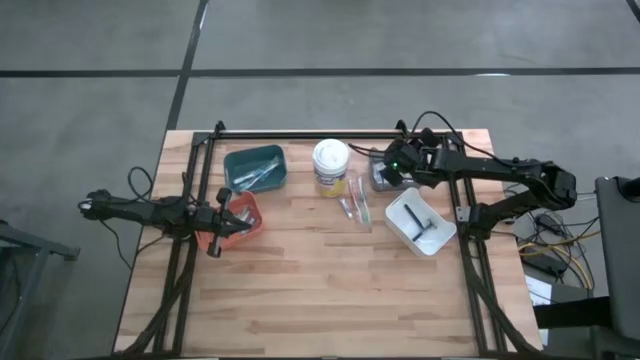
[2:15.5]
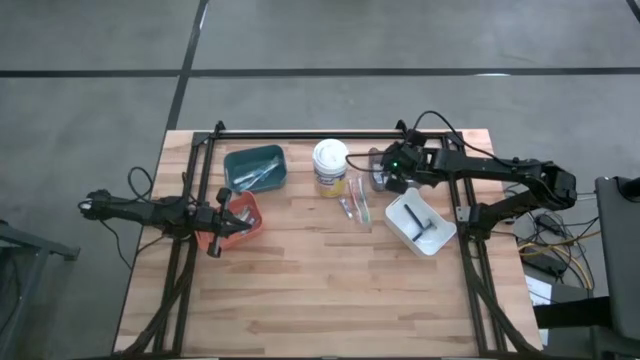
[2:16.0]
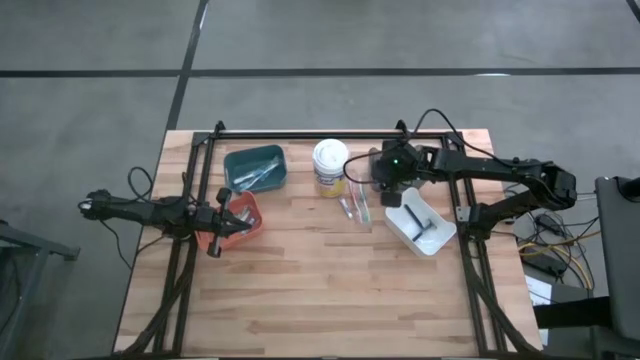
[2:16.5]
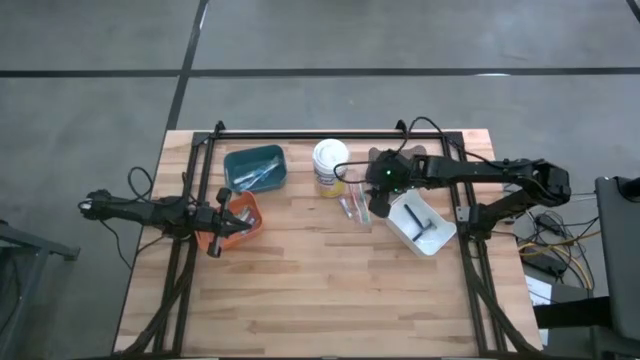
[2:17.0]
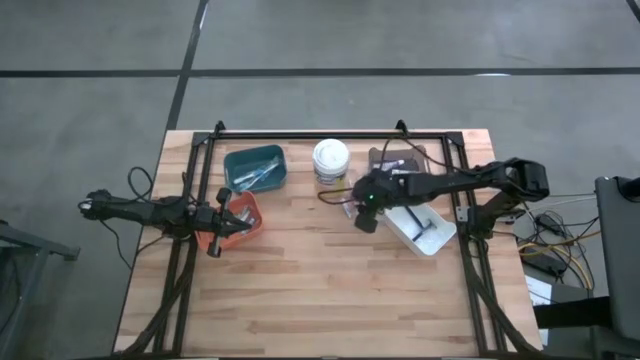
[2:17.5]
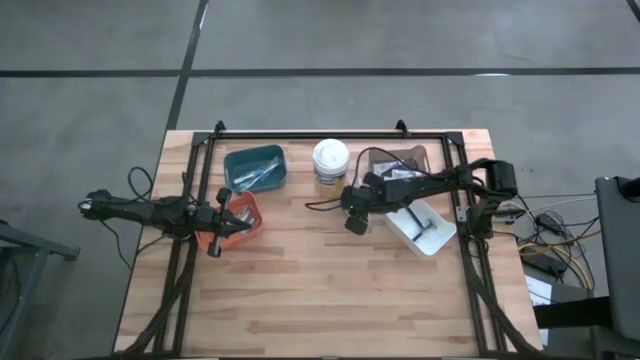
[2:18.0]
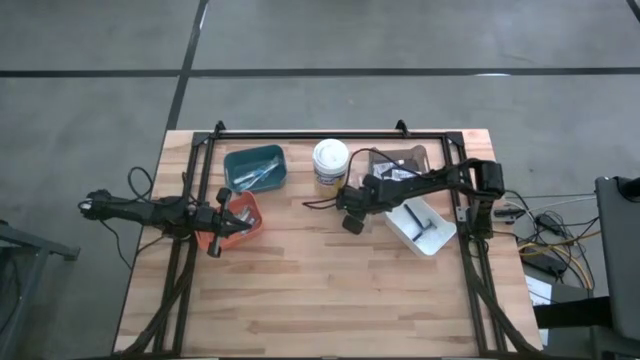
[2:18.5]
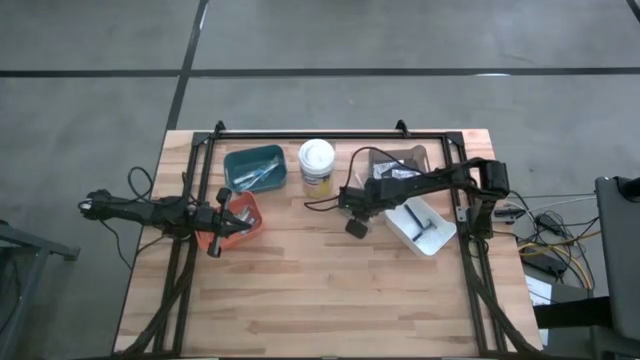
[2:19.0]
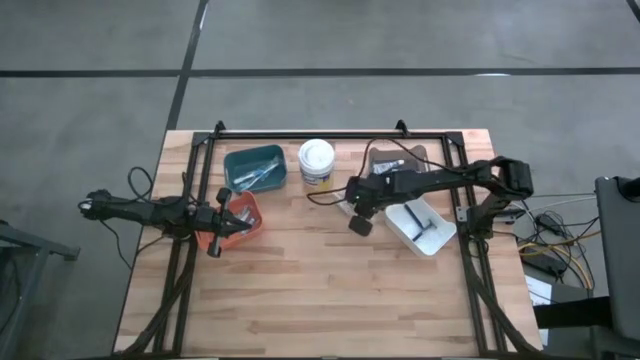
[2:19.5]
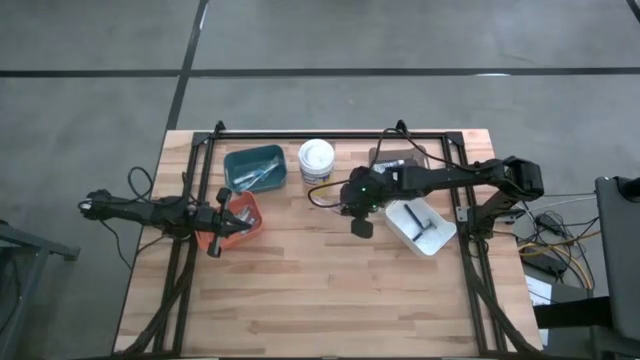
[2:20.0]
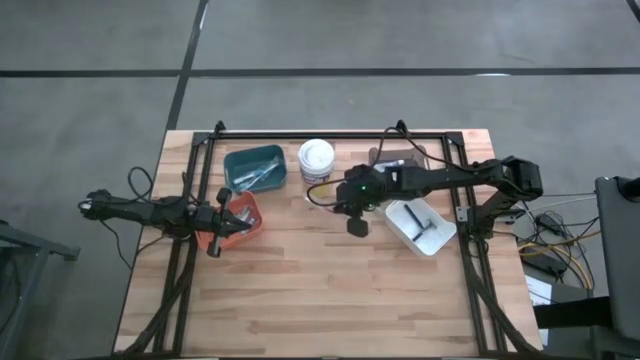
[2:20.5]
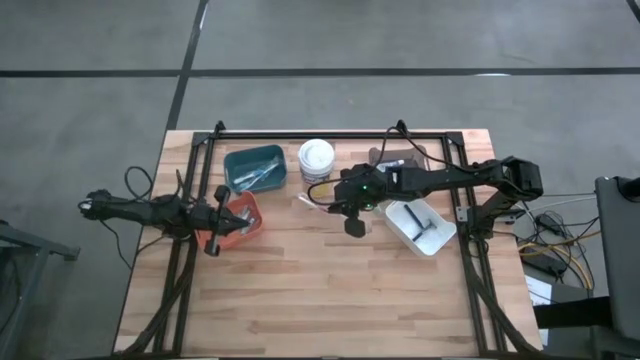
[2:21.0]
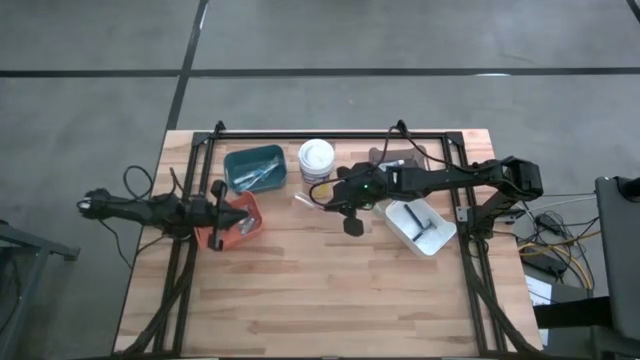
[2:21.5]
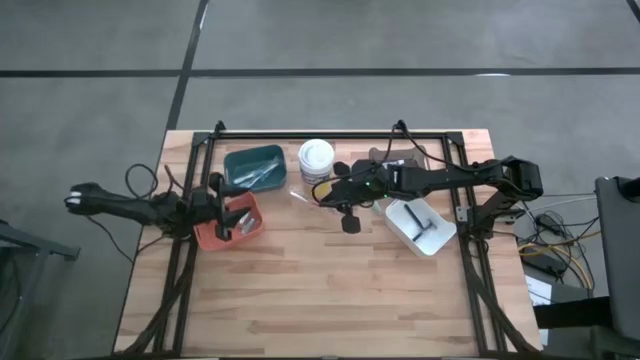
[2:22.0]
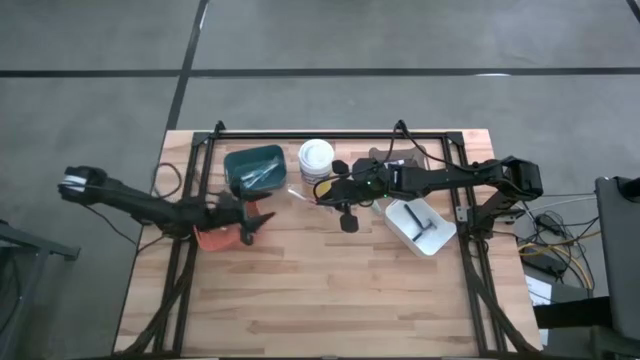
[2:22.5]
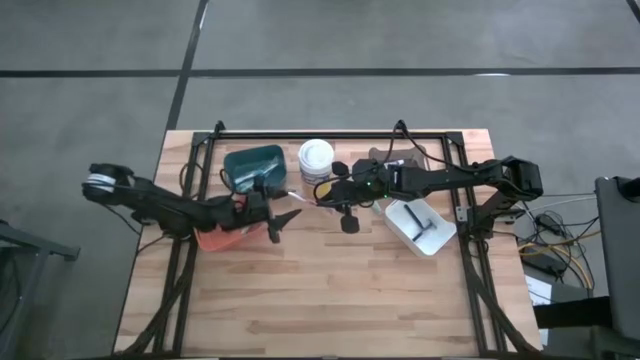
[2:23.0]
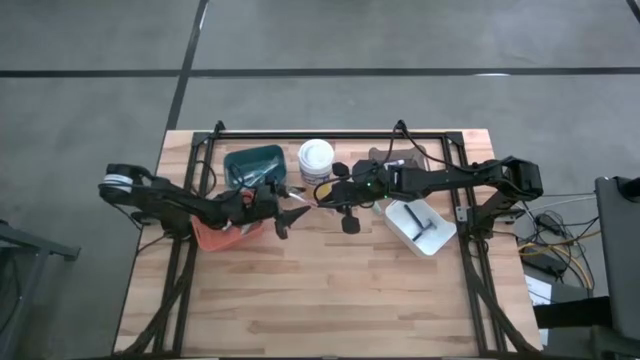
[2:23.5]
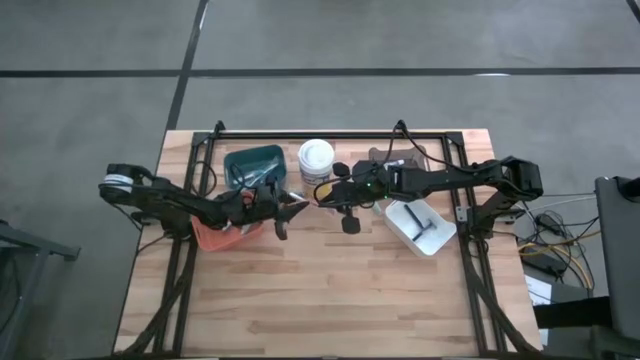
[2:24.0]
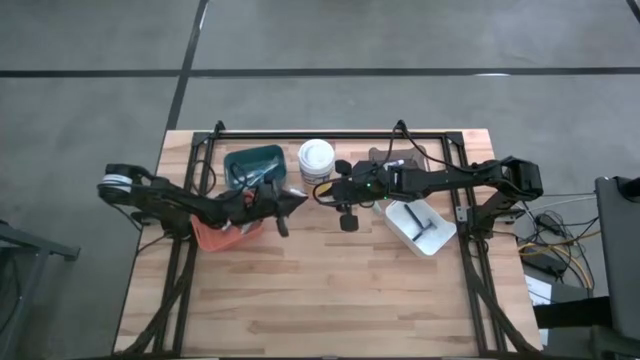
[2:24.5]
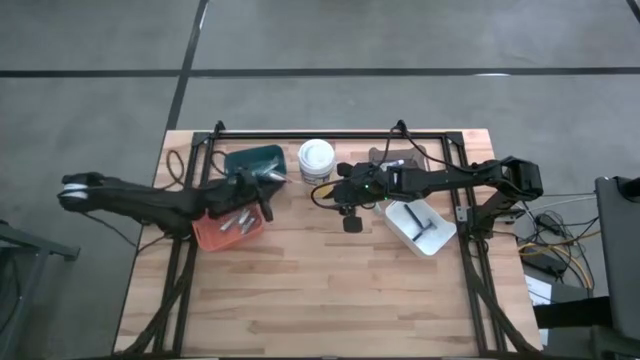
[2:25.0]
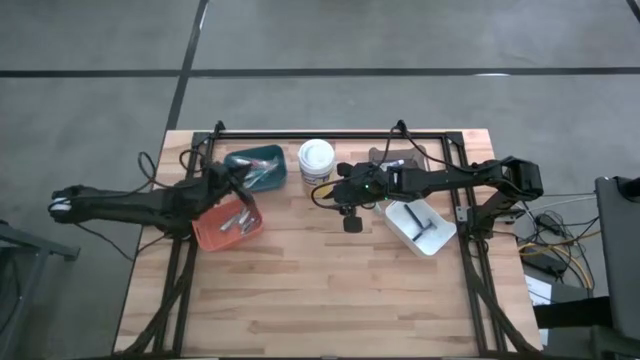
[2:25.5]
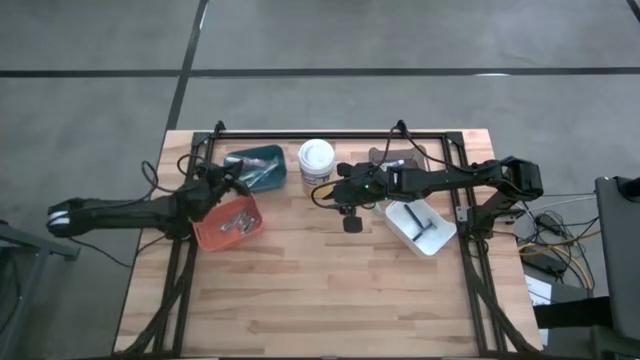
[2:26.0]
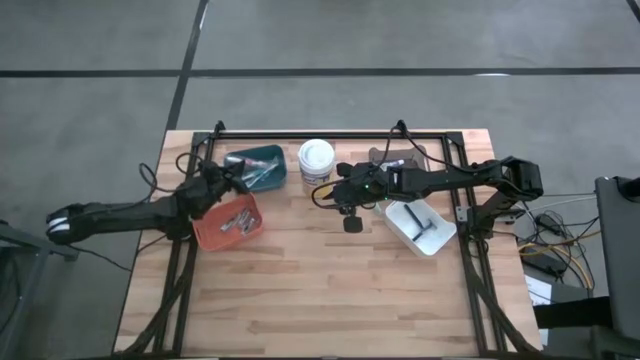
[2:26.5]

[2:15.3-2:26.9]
Task: Pick & Place Travel size toiletries
Put the orange toothbrush into the blue bin

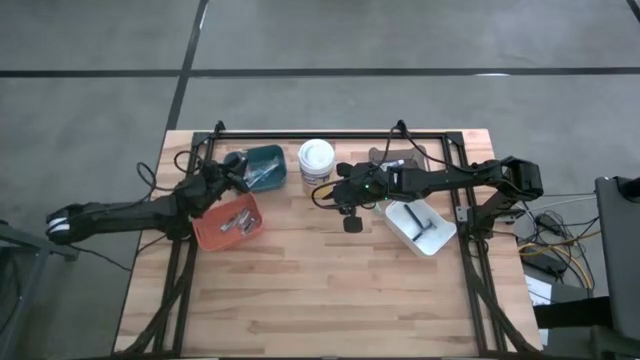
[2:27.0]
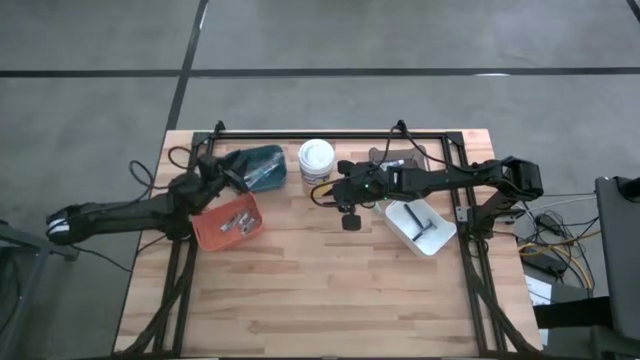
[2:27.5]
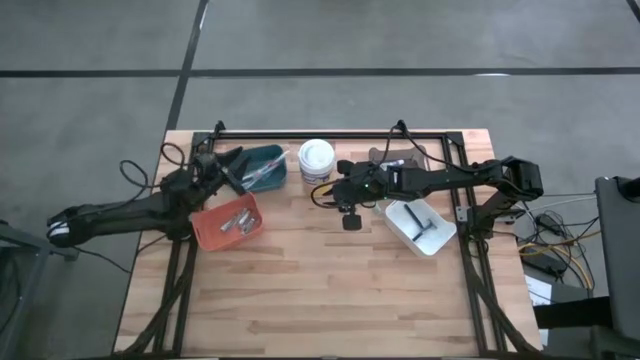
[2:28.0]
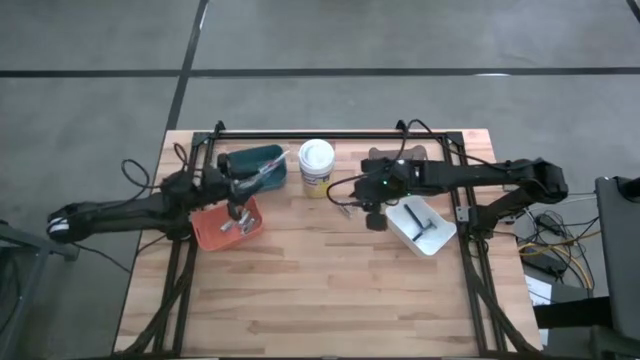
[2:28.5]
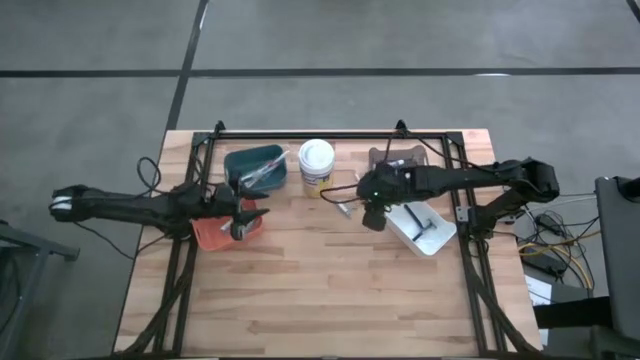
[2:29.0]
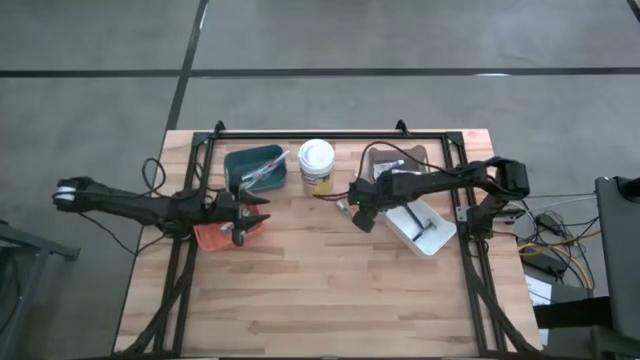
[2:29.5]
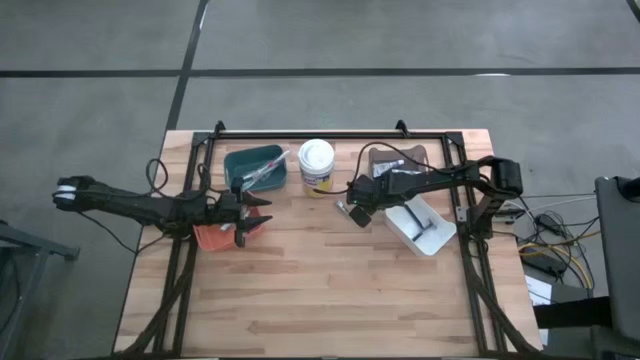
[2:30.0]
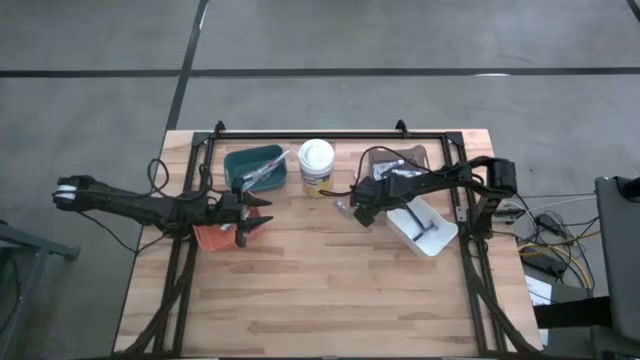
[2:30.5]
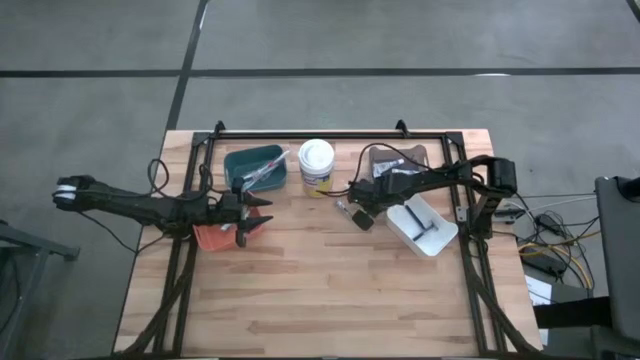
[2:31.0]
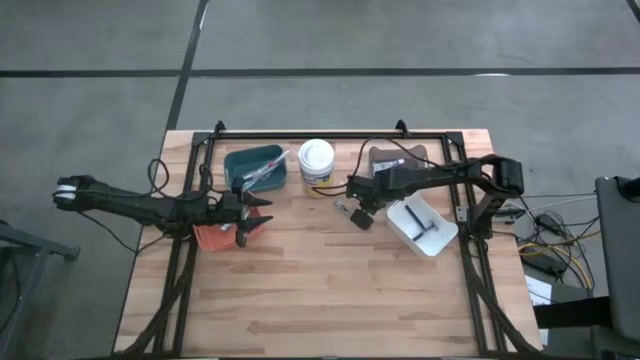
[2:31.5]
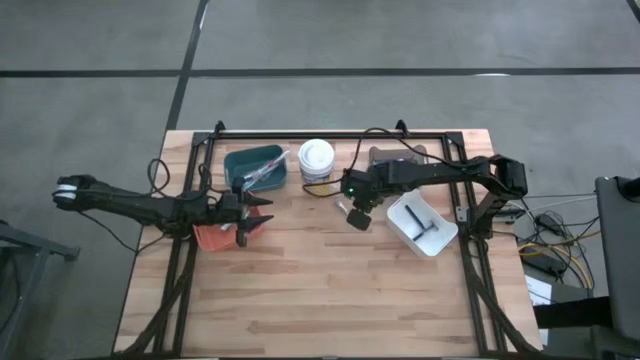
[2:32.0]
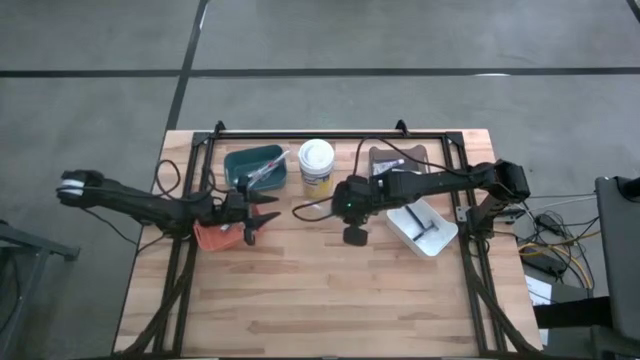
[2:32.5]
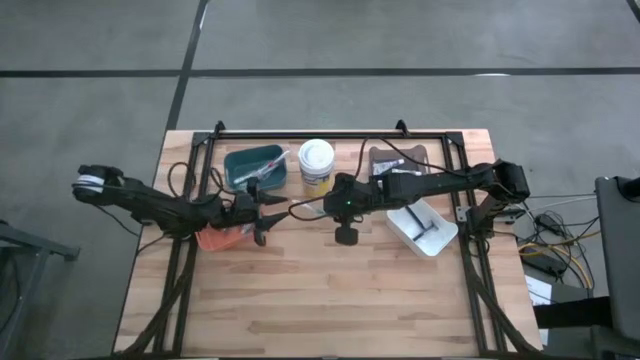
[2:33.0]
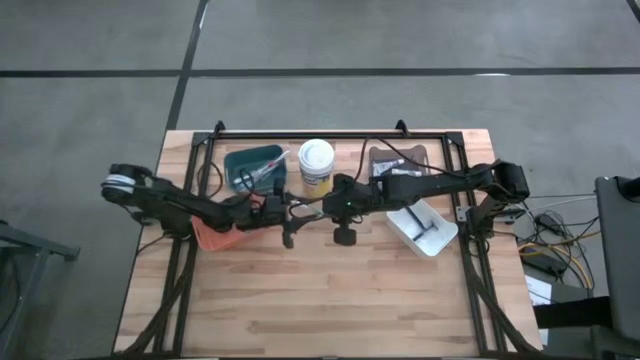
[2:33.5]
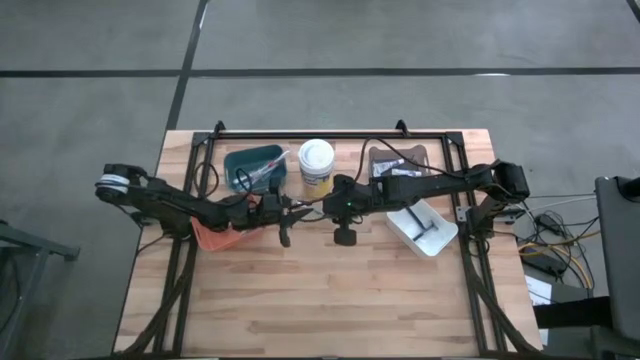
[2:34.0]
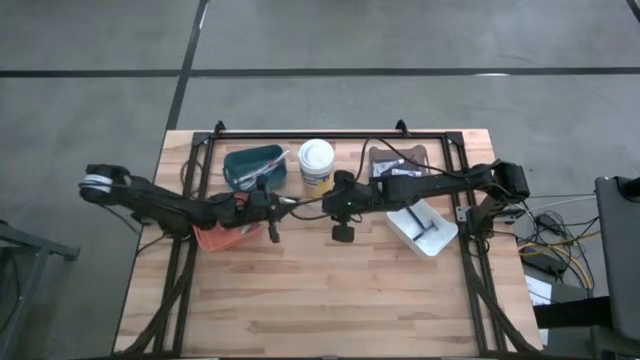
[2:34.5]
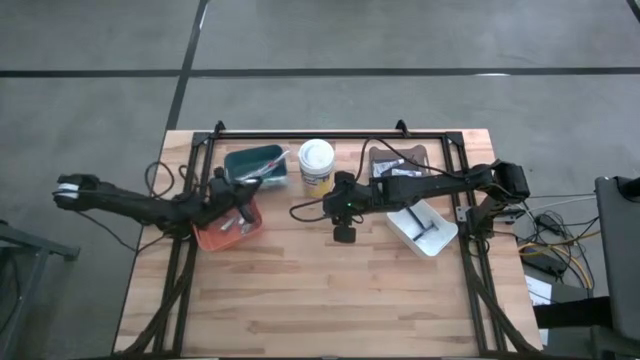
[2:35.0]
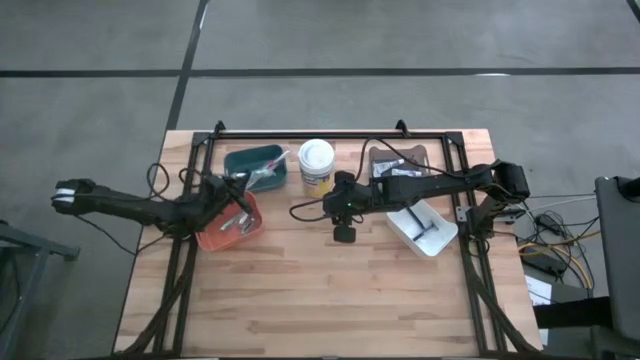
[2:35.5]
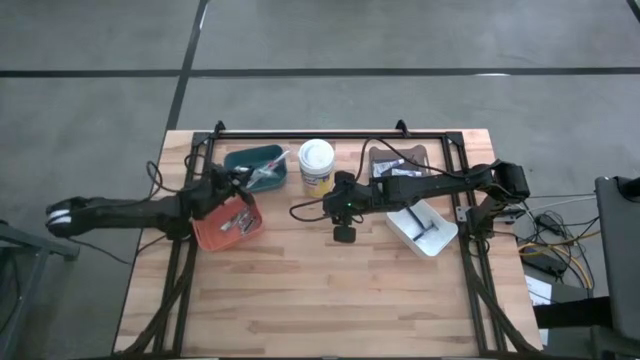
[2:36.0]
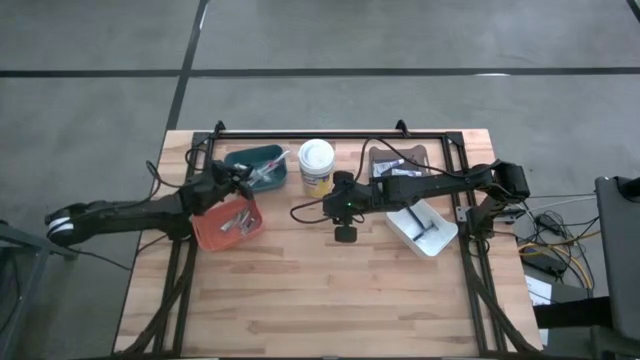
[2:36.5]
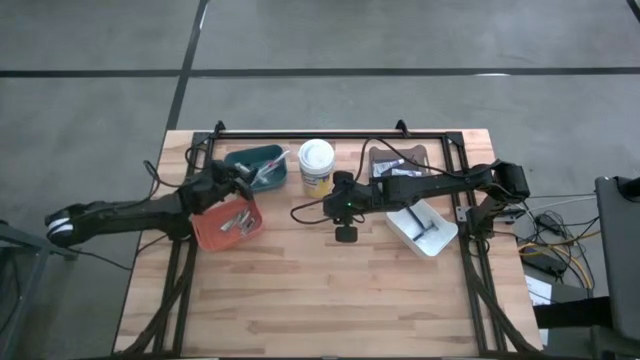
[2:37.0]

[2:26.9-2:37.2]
Put the green toothbrush into the blue bin
